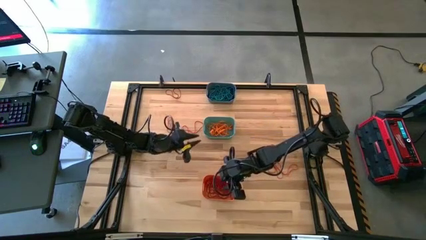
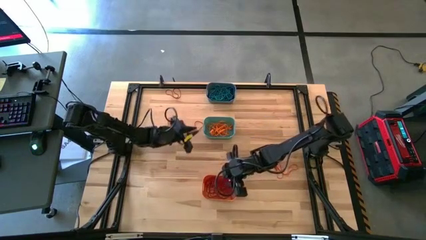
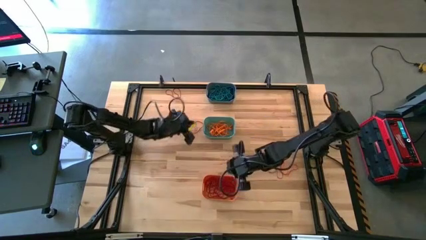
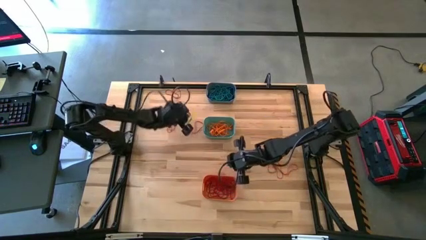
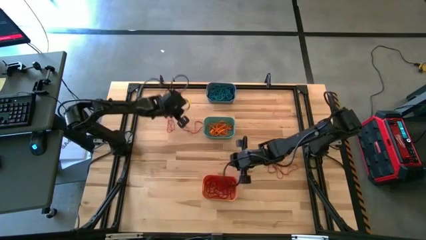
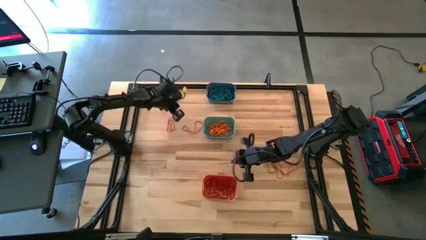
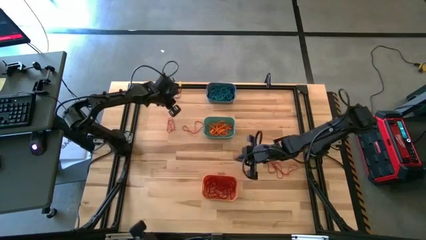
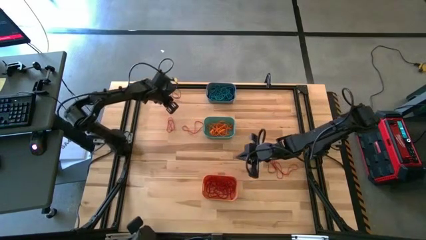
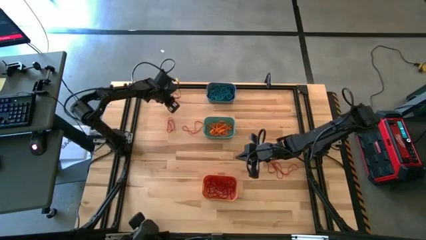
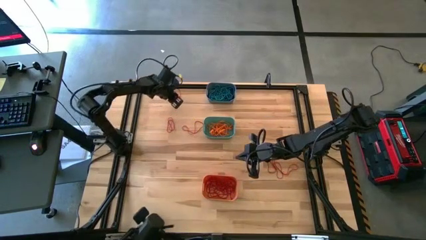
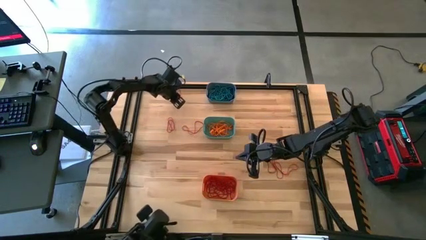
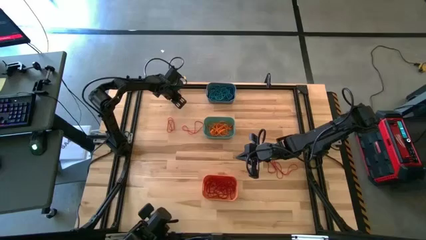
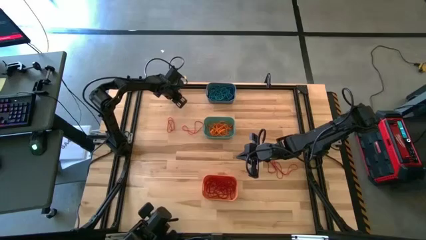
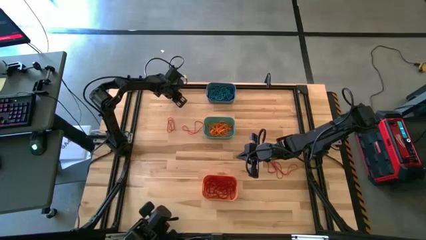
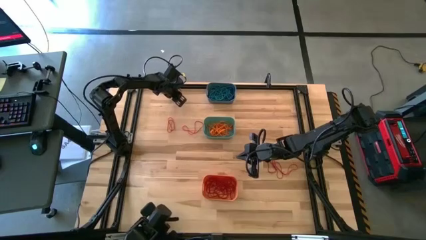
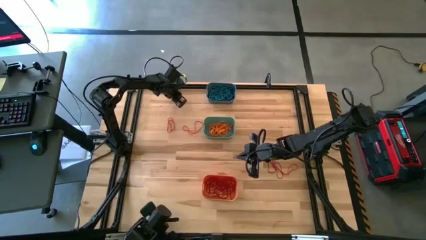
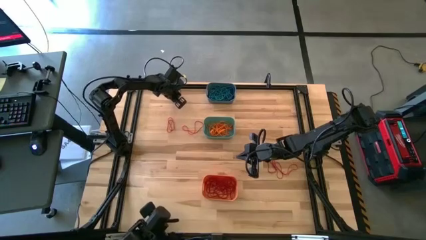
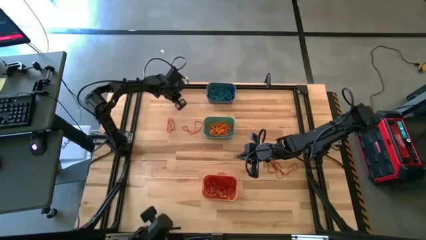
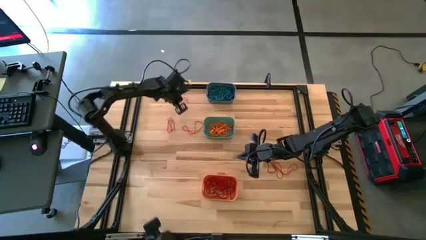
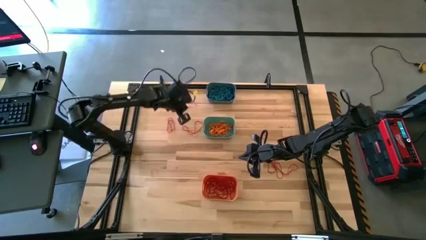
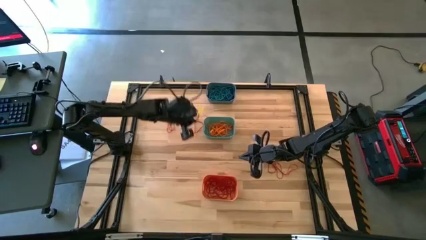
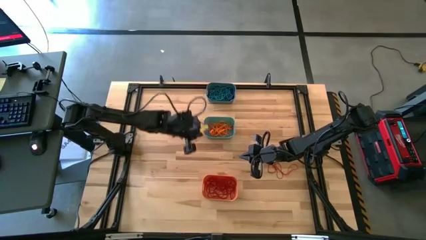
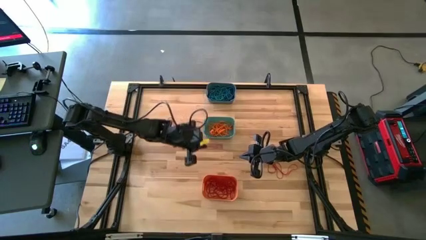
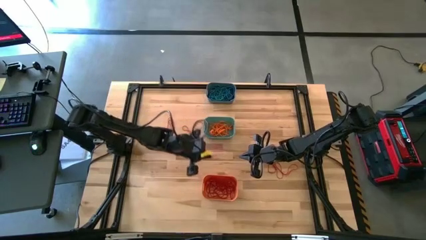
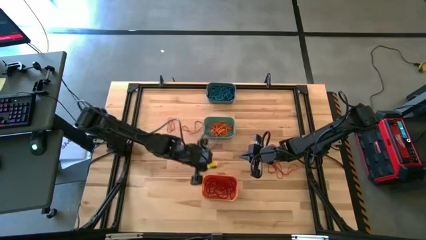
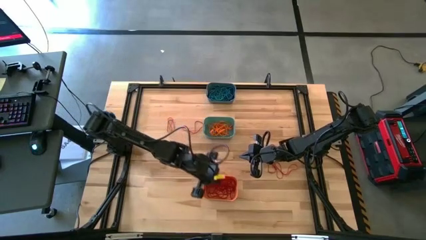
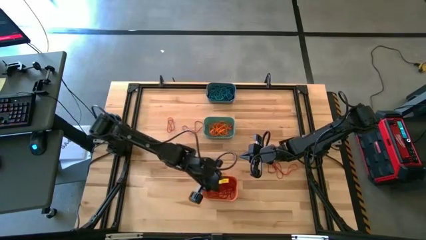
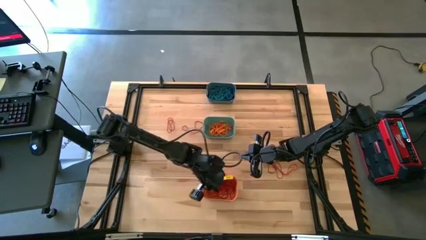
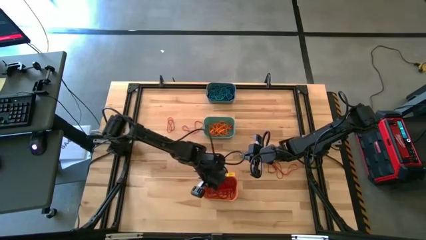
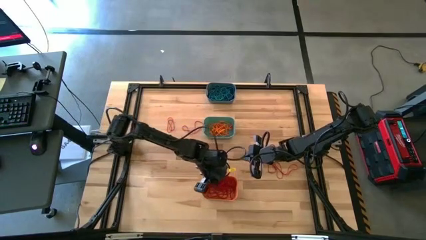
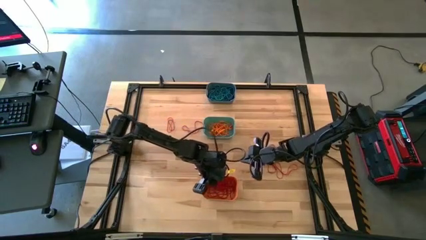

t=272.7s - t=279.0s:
Task: Sort rubber bands into baskets
Put the red rubber band into the orange bin

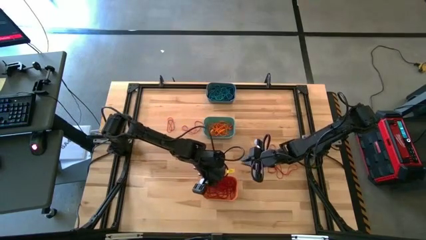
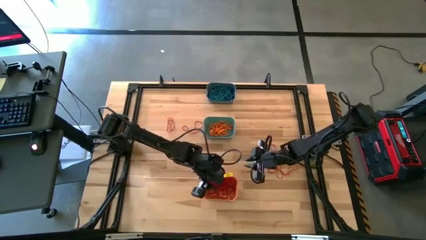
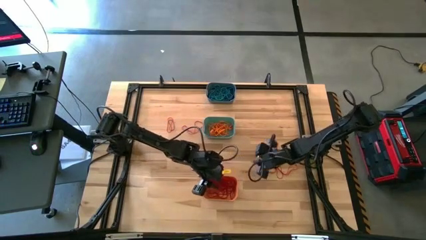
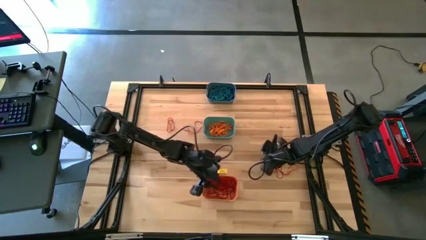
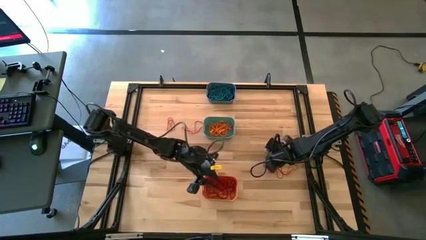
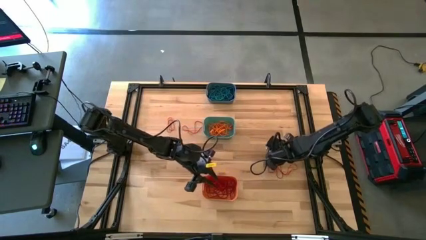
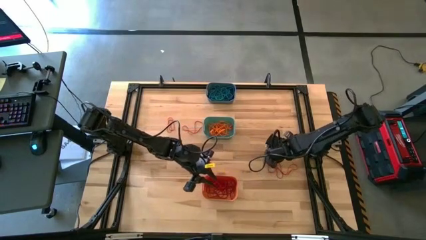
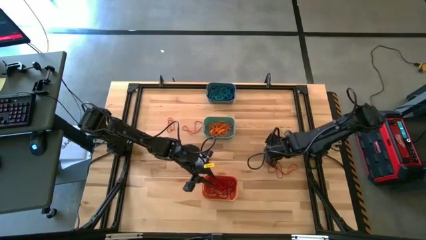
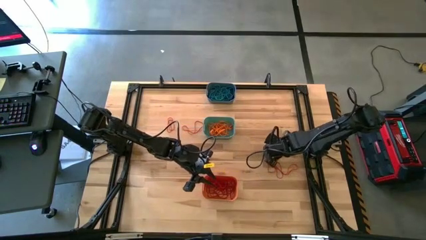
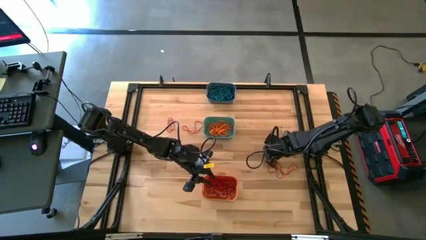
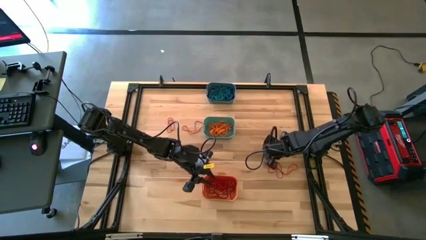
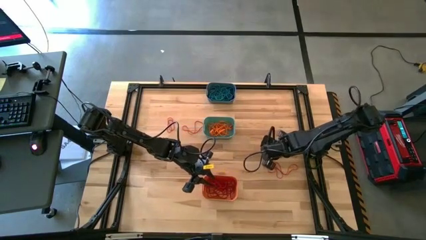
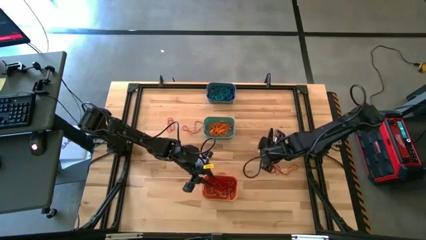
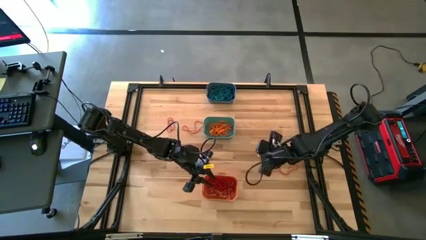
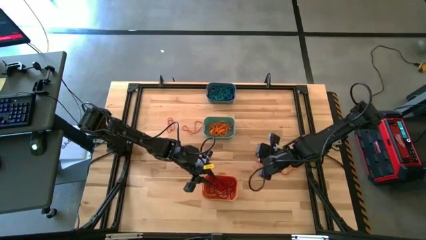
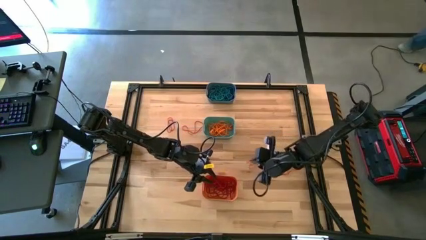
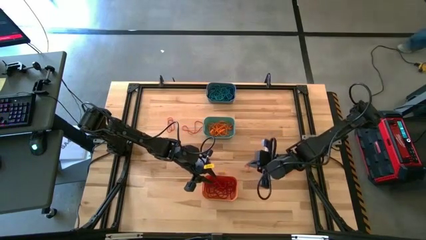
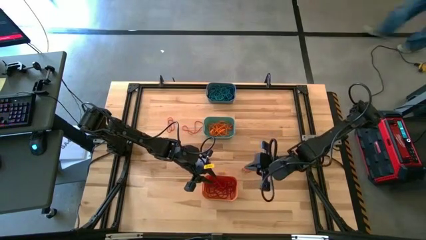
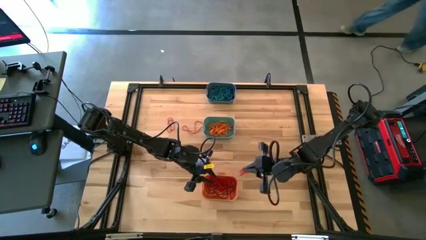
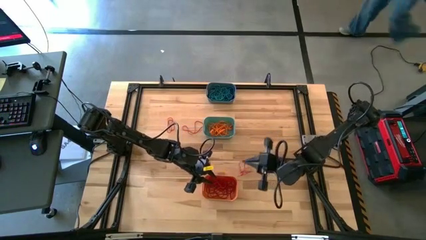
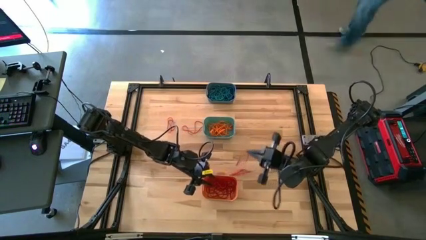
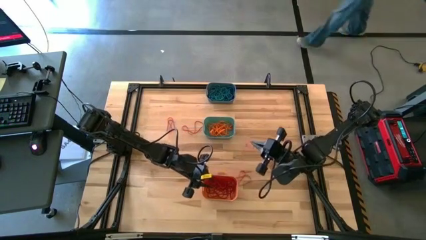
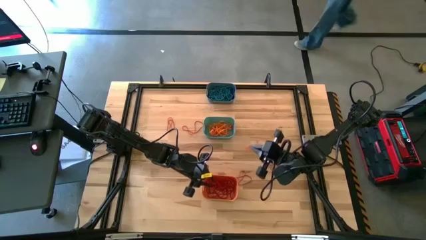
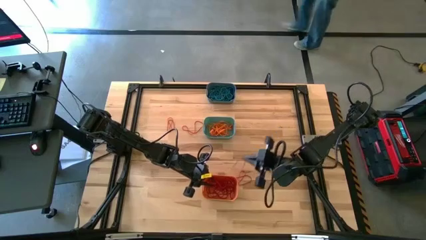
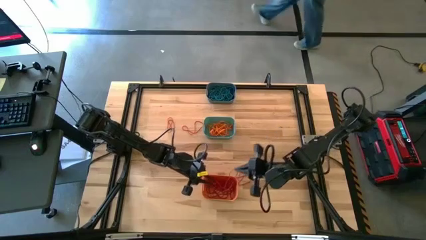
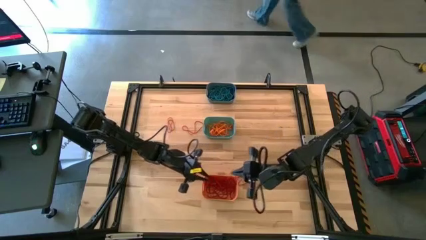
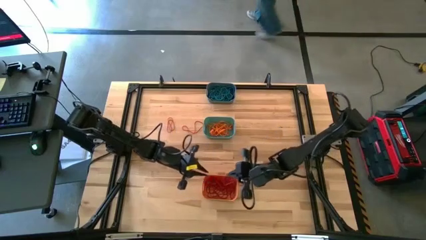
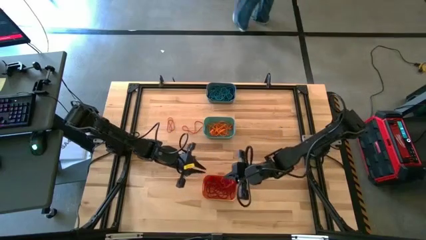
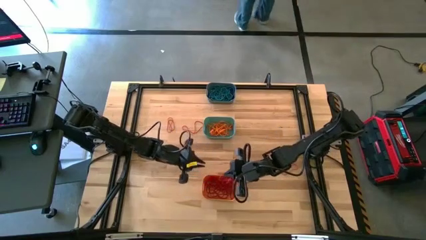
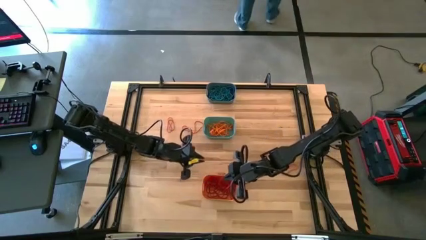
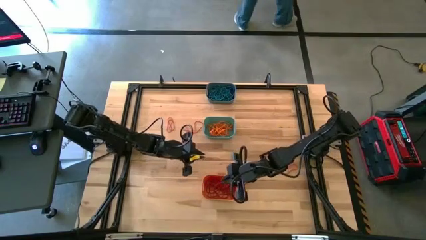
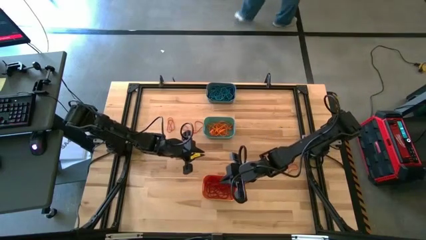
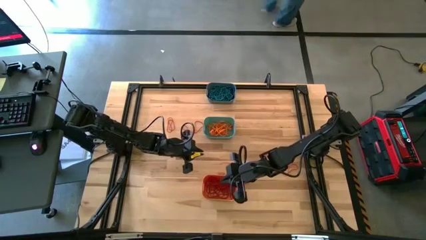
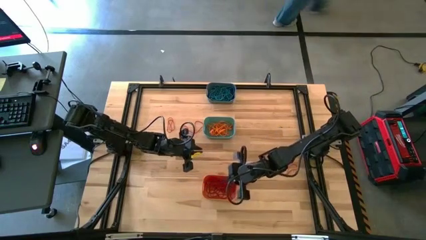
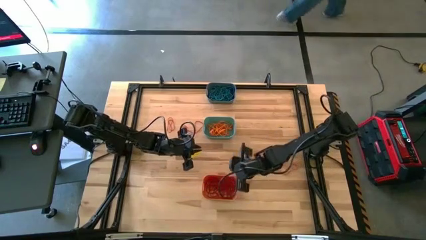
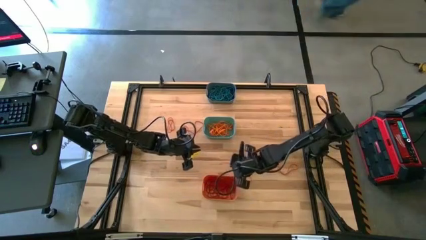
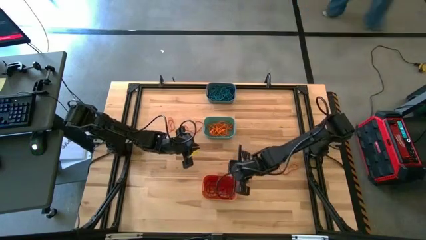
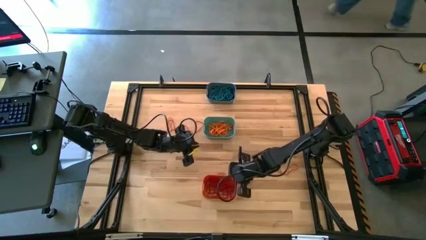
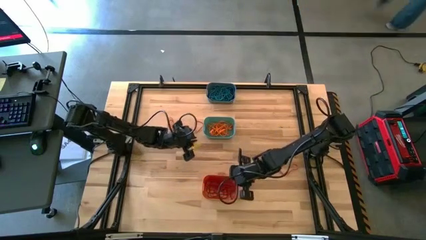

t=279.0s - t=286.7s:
Put the red rubber band into the orange bin
